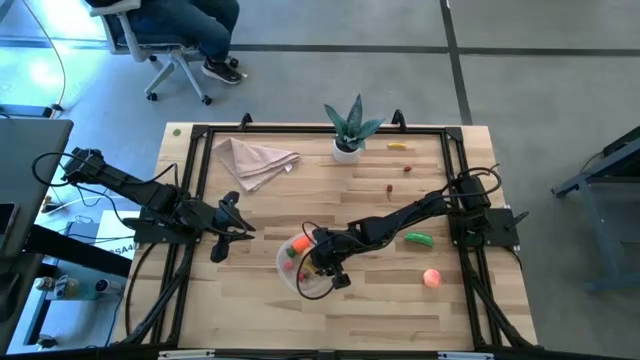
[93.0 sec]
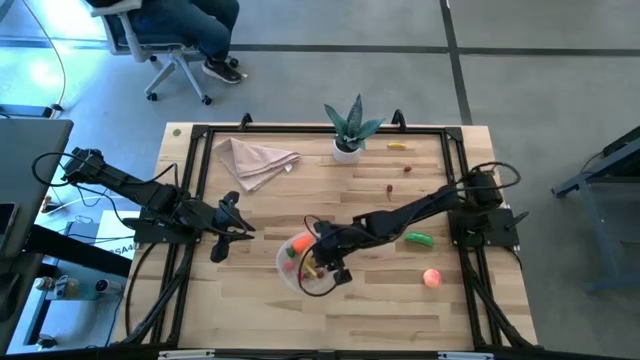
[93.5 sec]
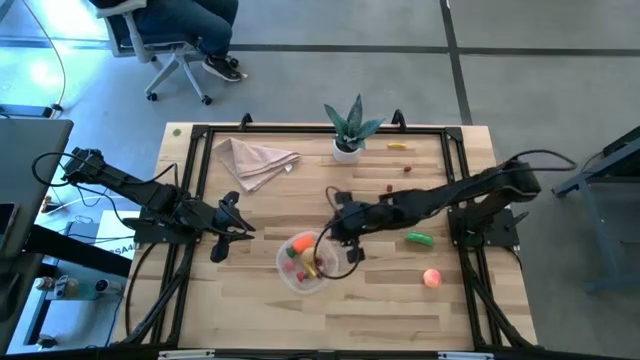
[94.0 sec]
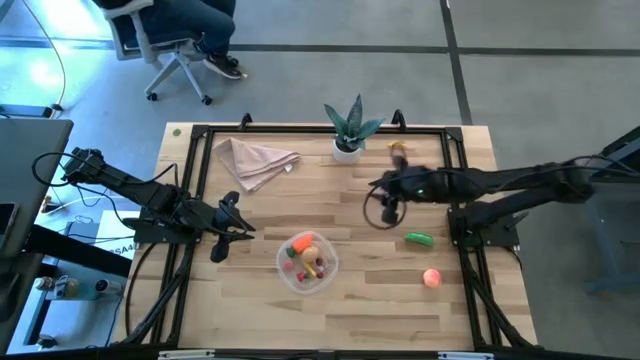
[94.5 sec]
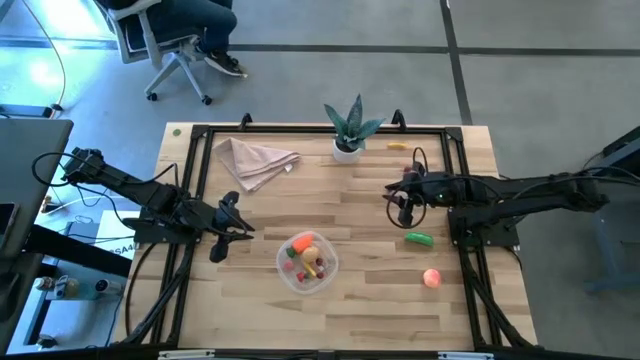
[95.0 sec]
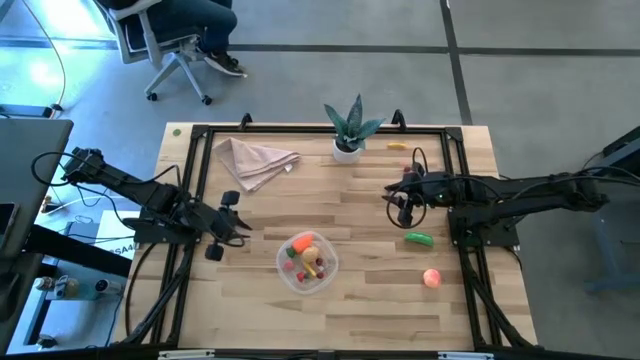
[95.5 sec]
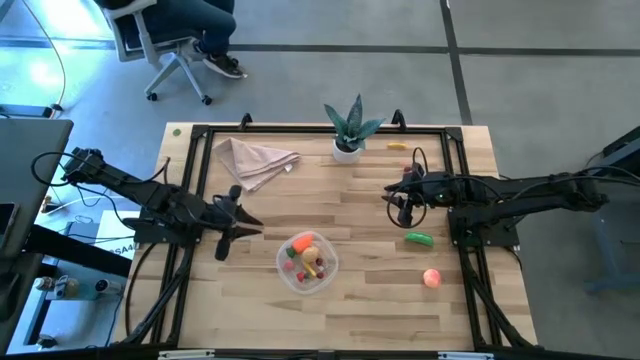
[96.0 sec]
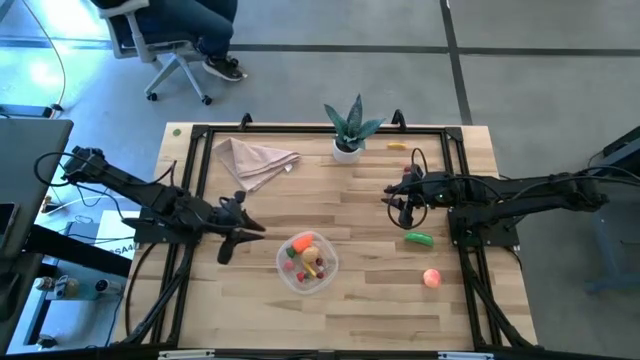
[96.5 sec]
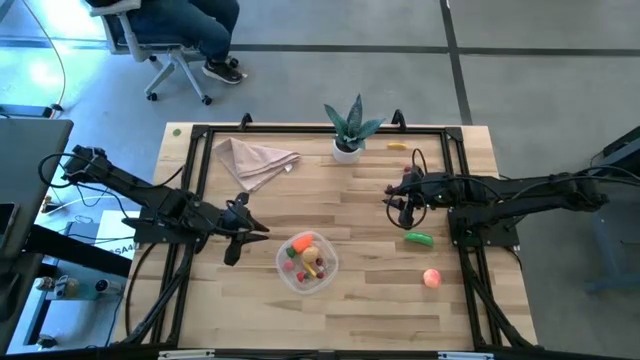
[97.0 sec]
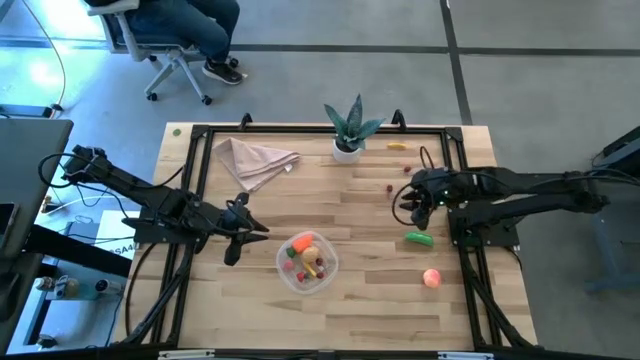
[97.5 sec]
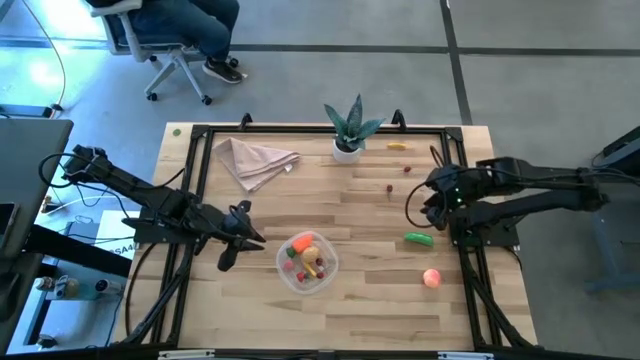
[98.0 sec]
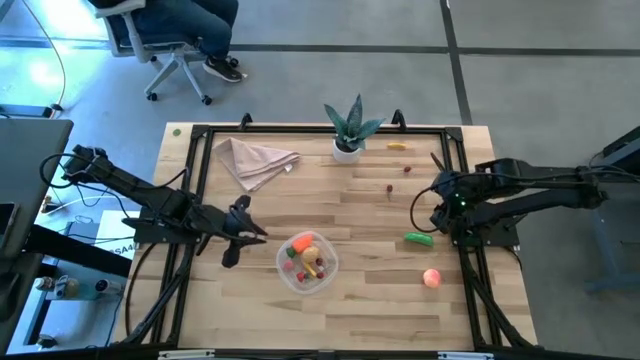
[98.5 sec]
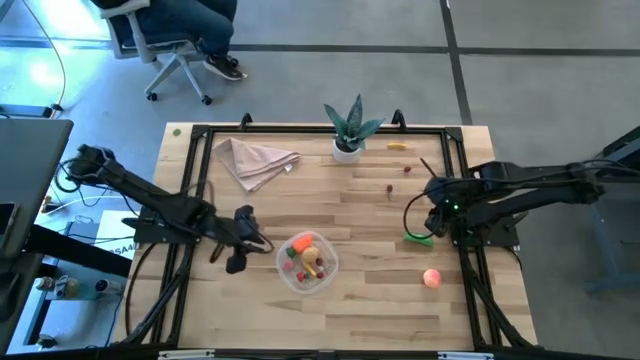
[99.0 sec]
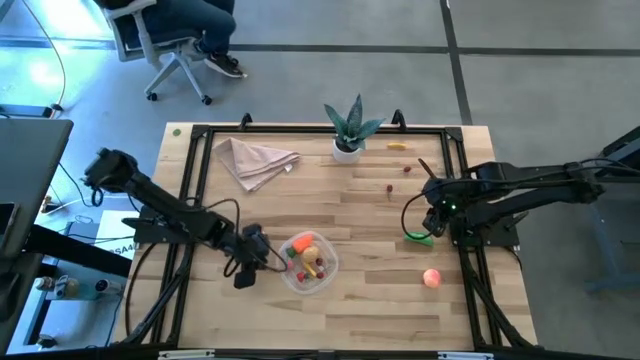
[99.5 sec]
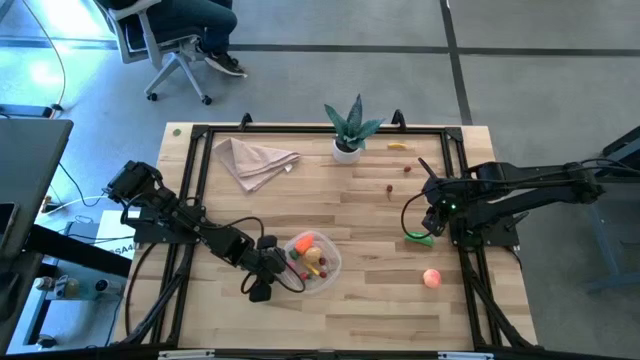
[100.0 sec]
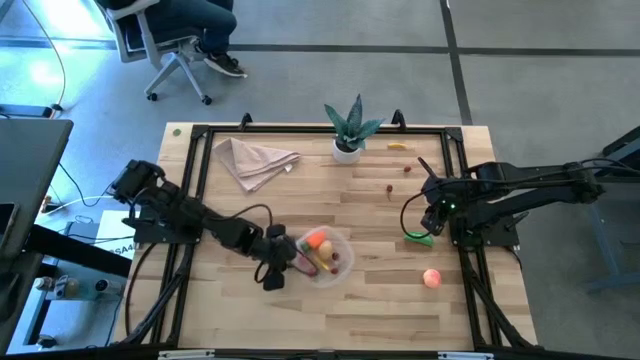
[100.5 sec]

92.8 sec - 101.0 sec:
Task: Pick and placing Produce into tupperware
Adjust the transparent container on the table

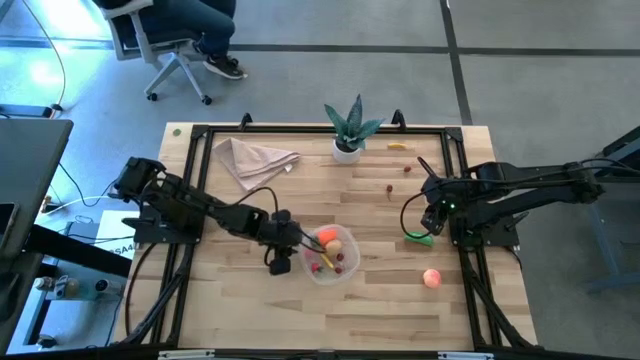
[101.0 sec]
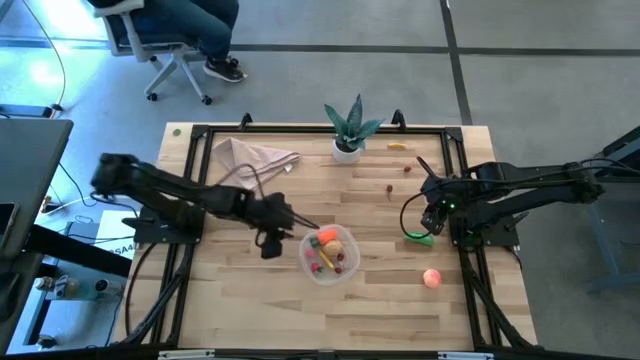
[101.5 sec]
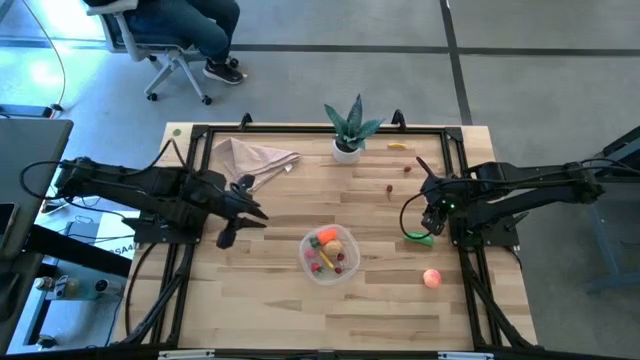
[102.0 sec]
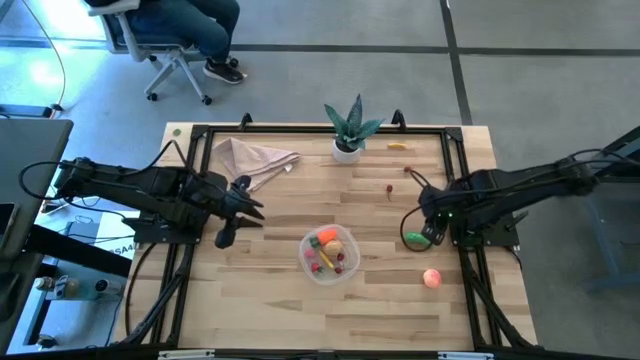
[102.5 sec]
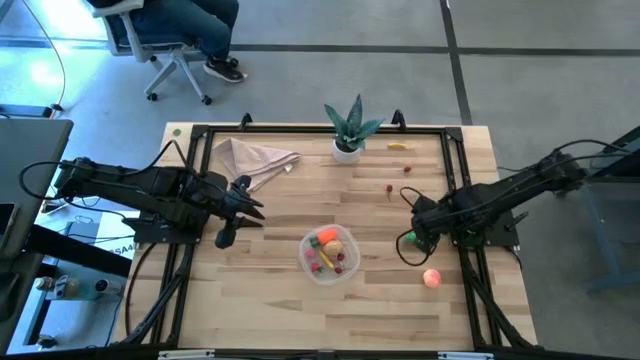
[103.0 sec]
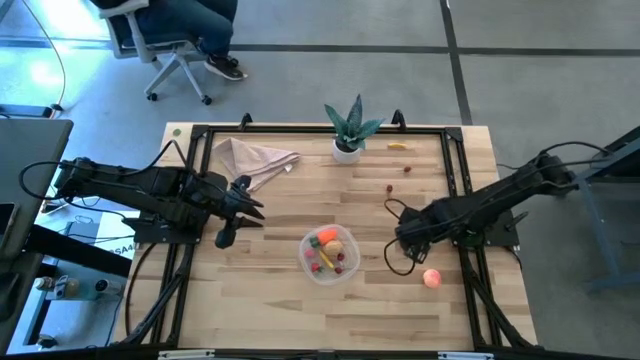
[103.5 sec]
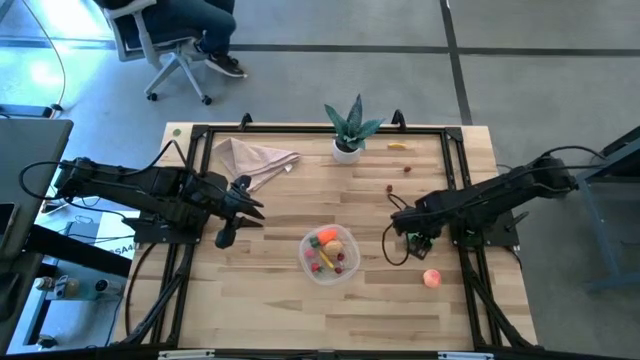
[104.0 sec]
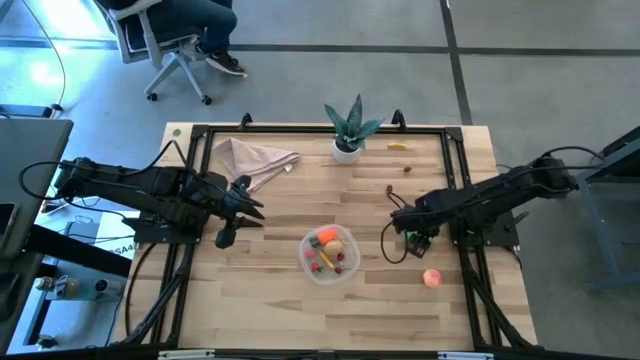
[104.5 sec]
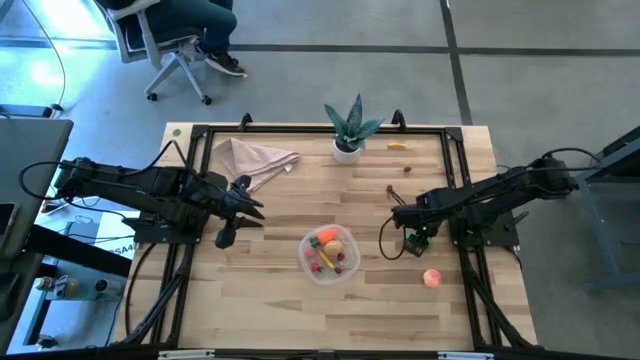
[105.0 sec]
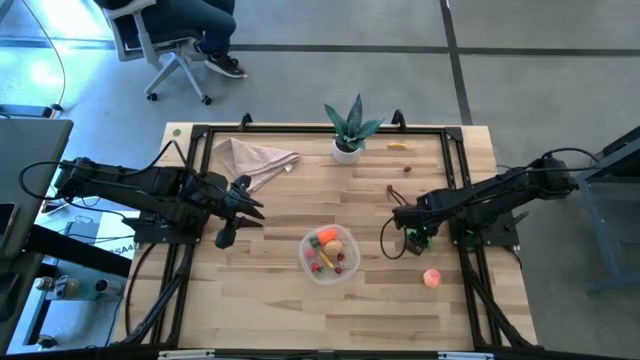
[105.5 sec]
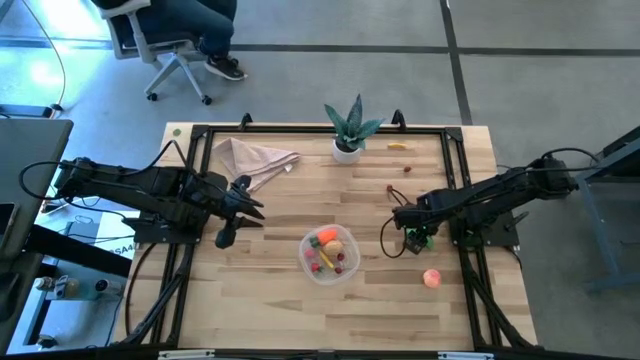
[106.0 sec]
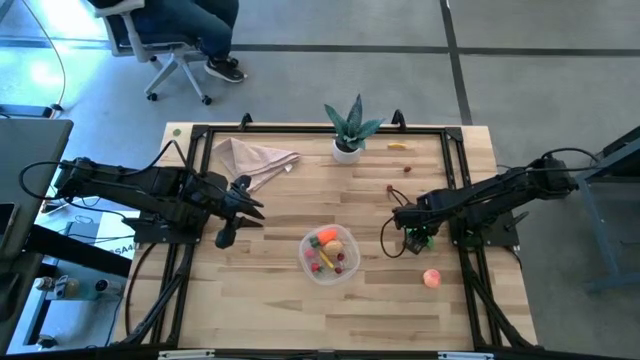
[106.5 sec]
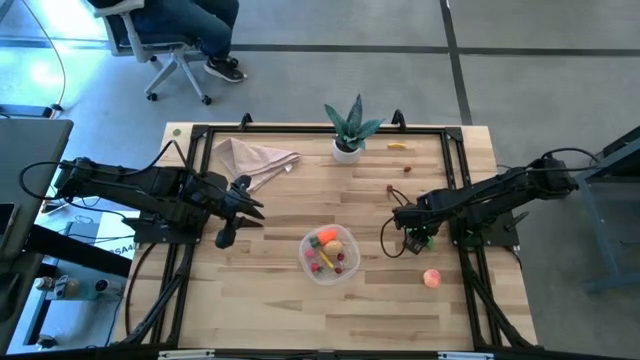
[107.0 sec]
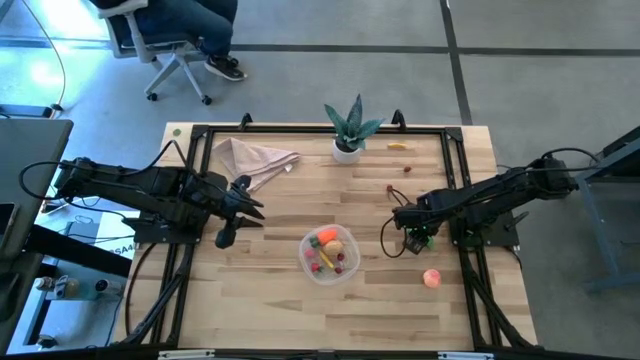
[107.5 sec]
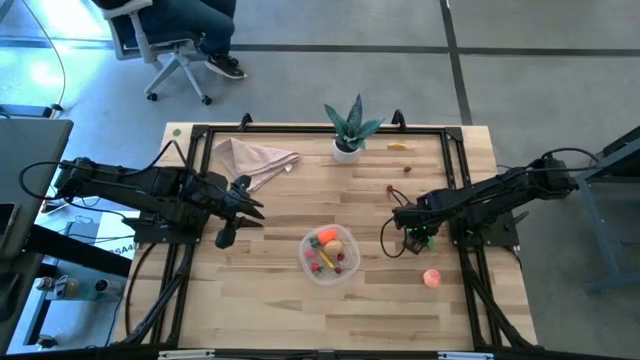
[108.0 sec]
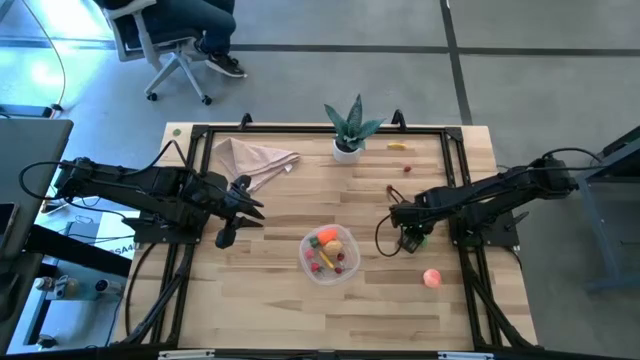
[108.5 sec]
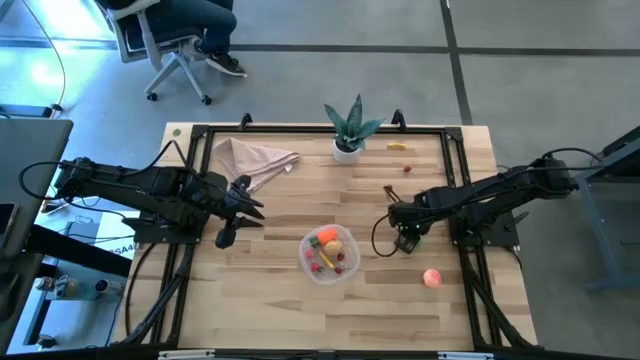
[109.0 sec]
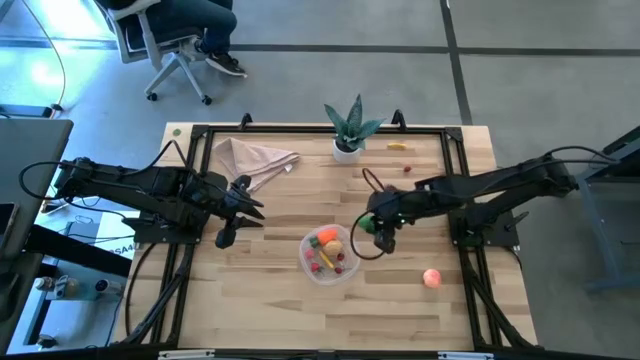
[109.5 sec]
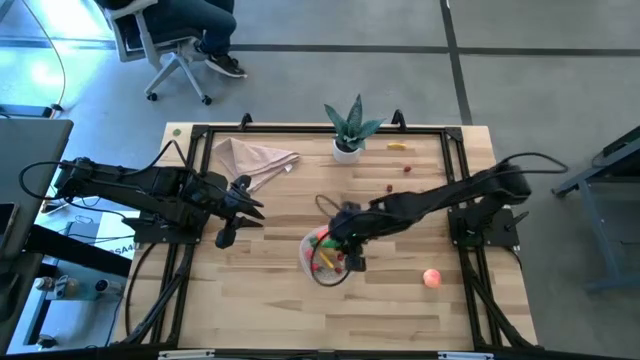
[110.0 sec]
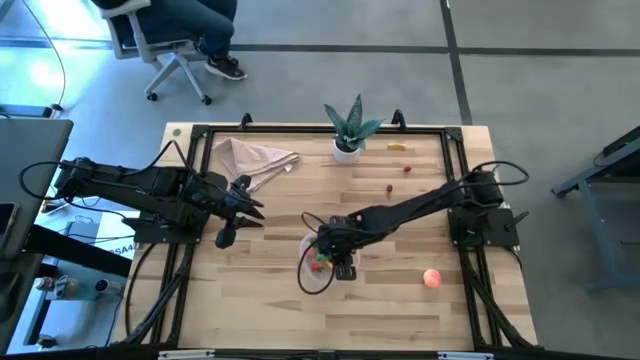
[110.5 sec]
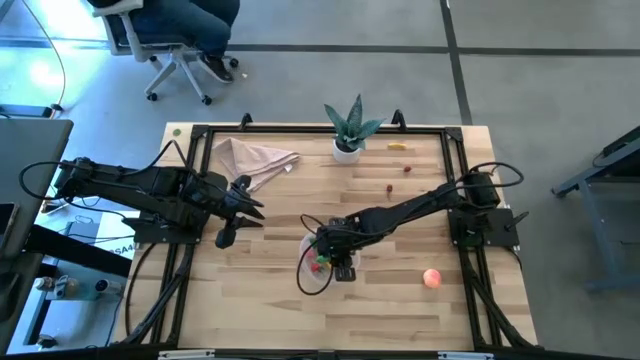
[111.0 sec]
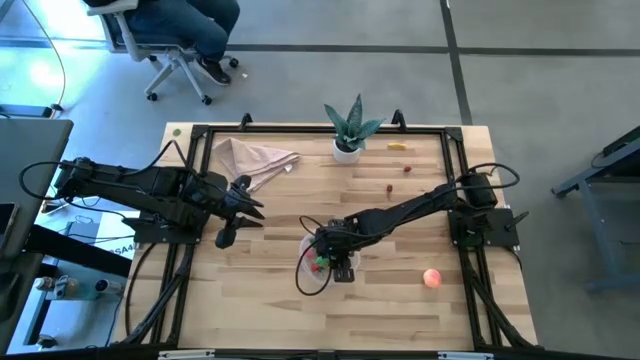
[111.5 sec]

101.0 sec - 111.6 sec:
Put the pea into the transparent container
